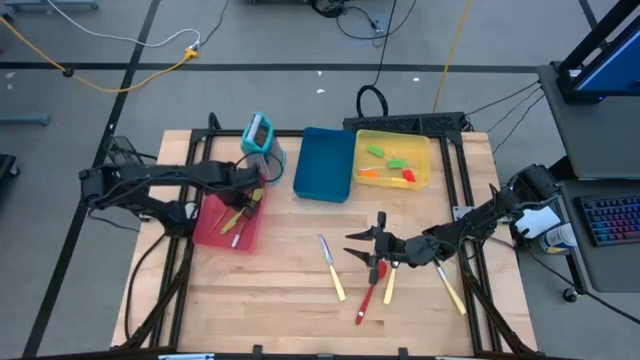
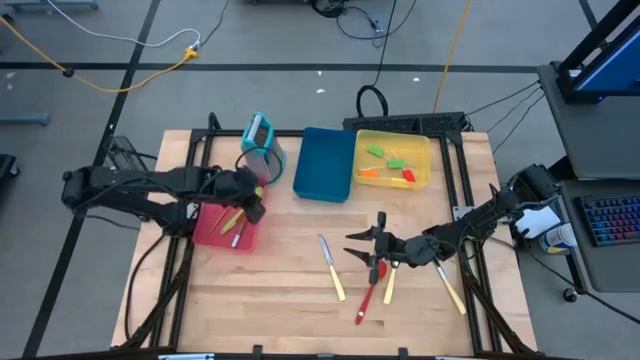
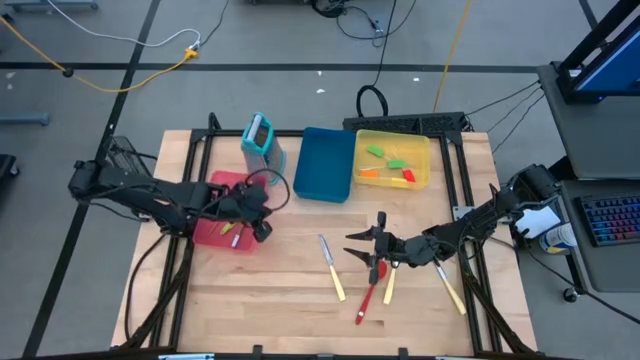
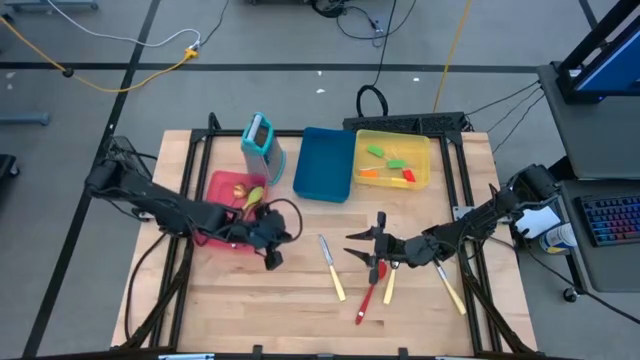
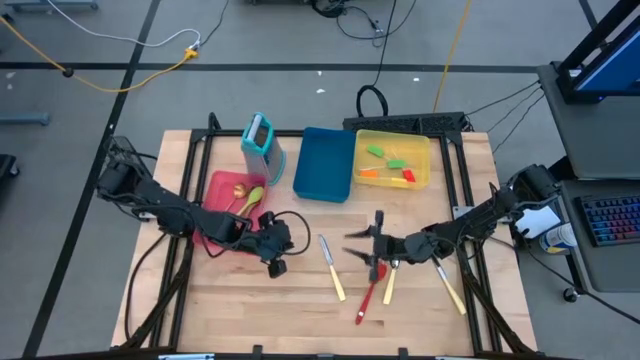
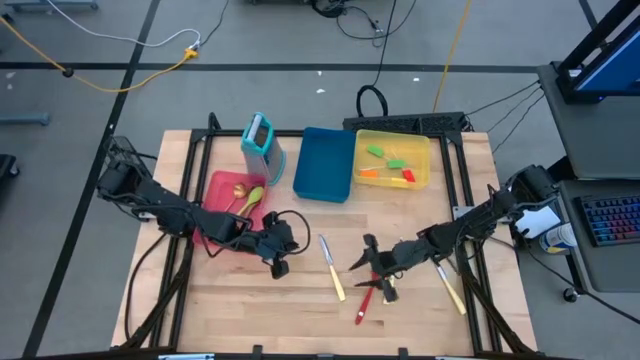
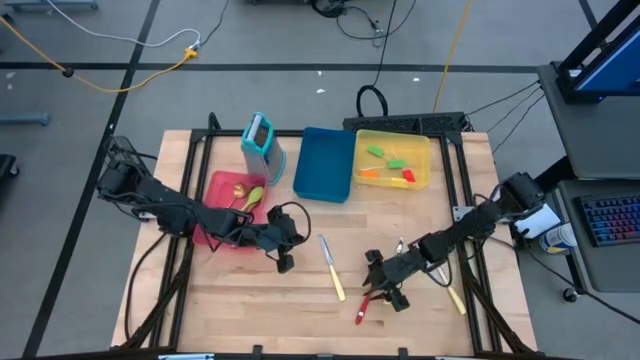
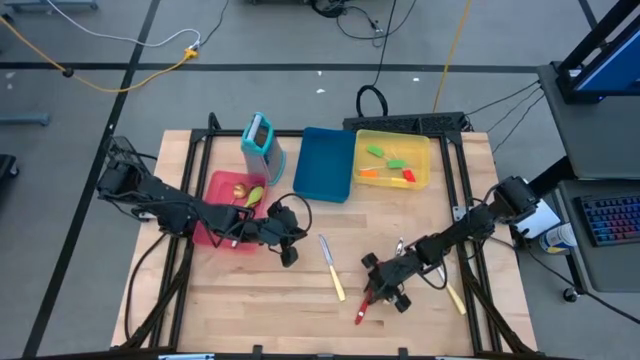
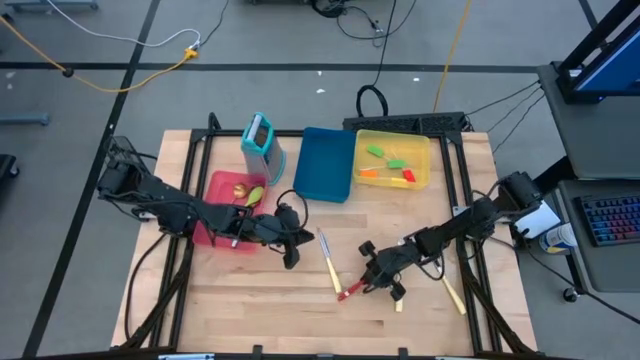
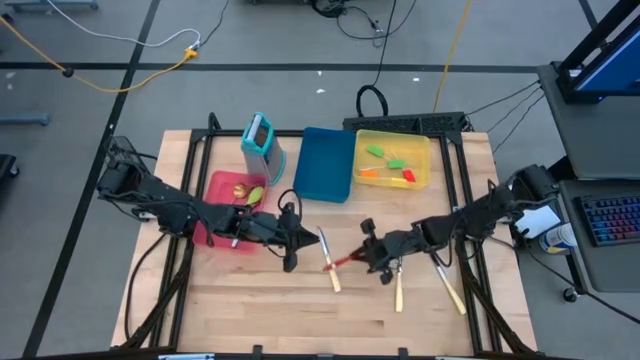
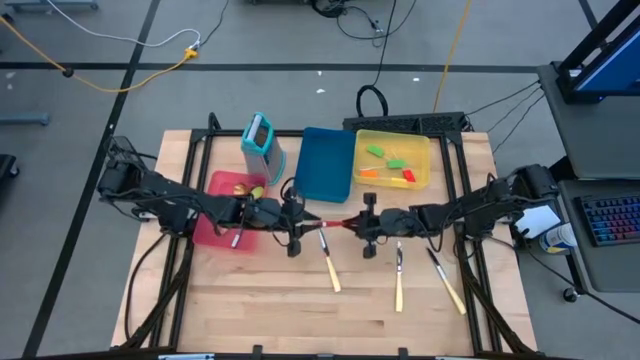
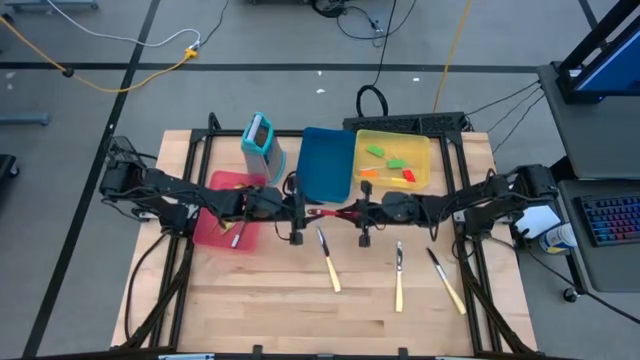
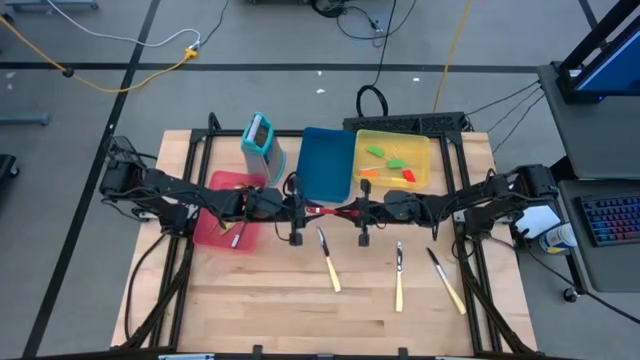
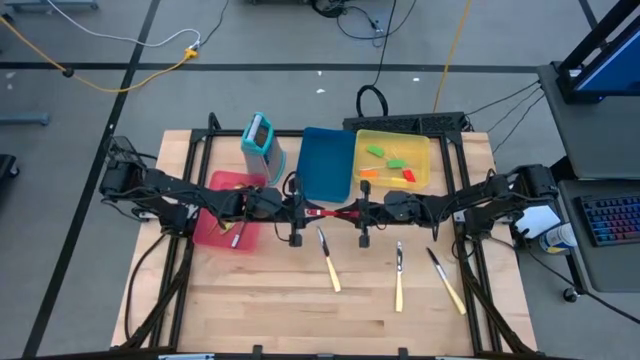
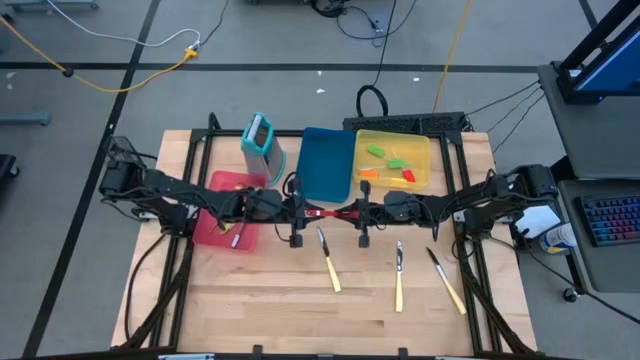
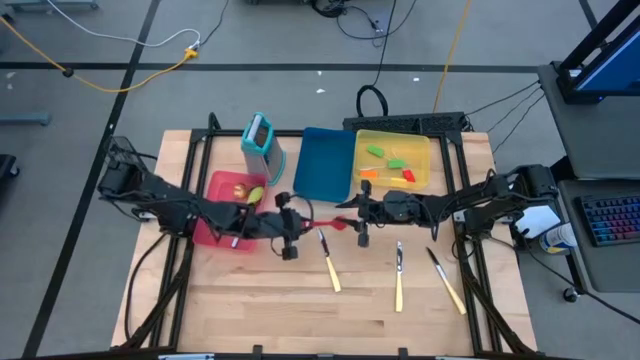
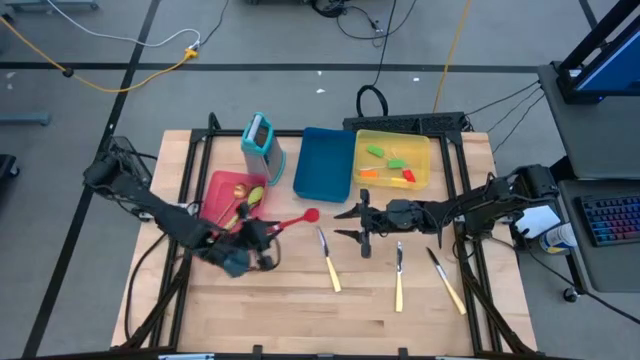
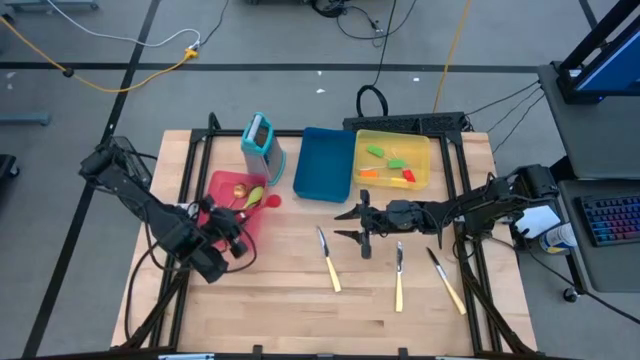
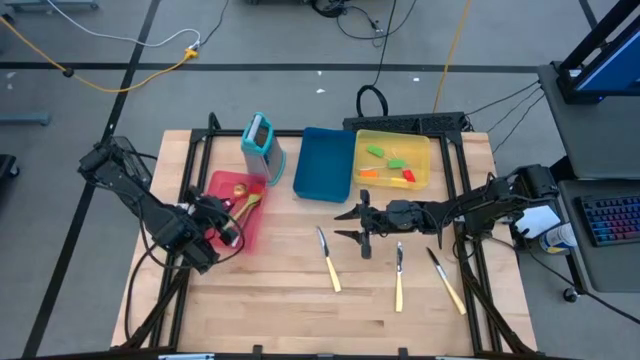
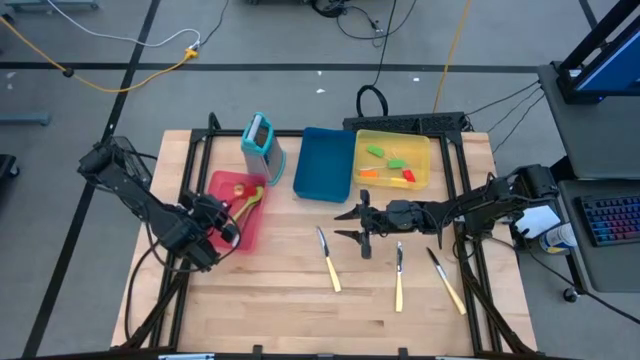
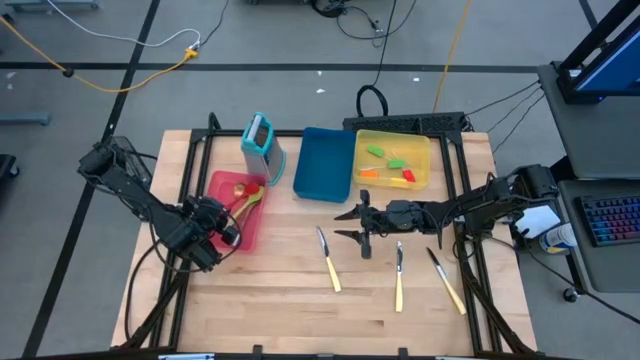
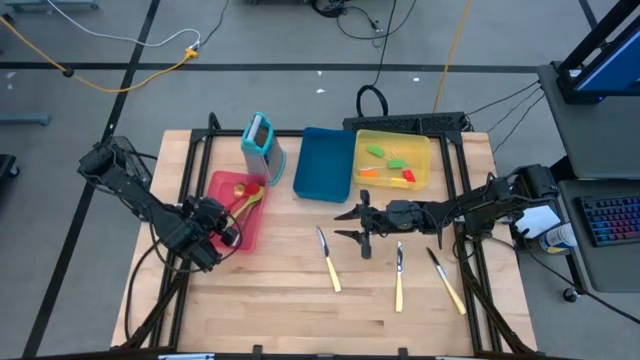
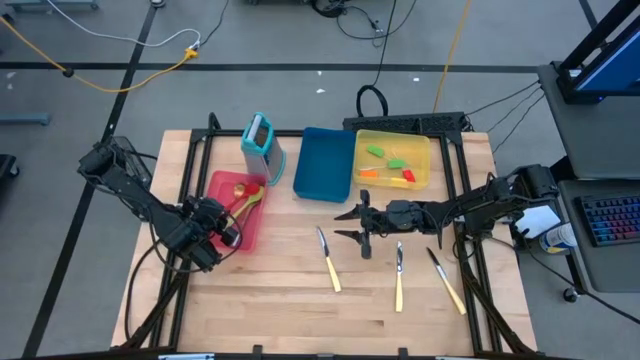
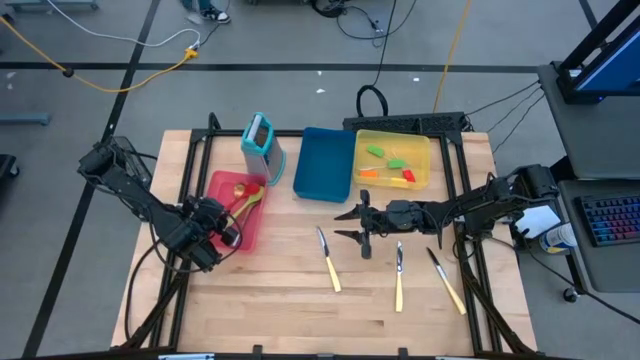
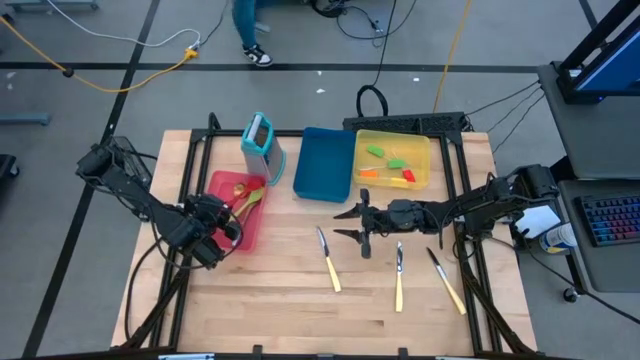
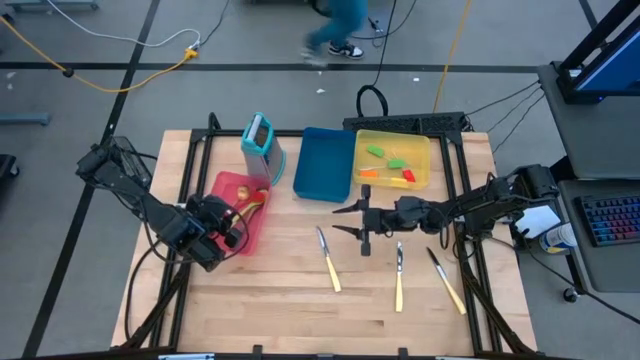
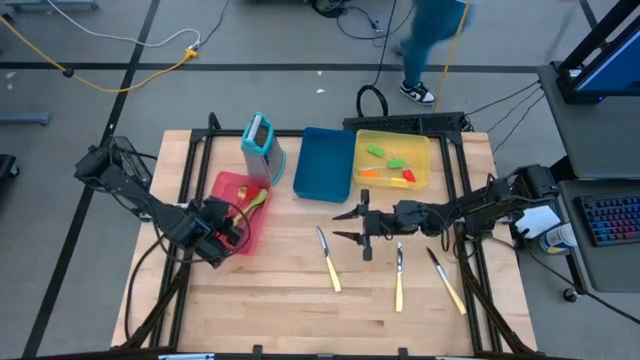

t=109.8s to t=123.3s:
Task: Pick & Place Kitchen Items
Put the red serving spoon into the pink bin

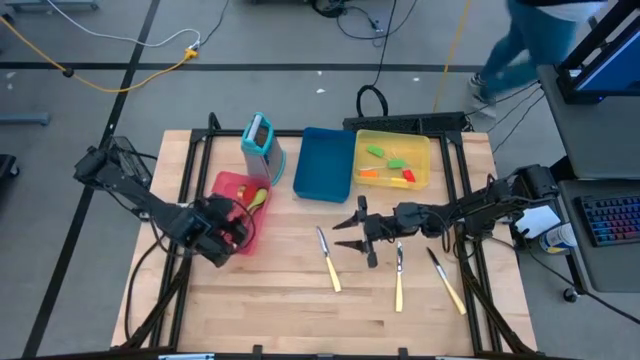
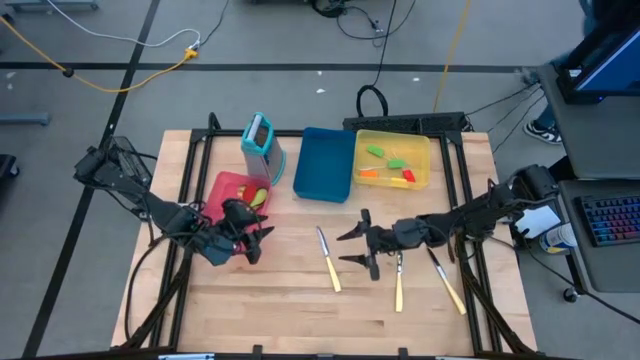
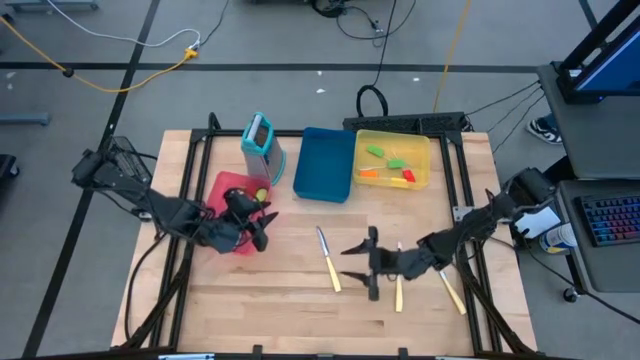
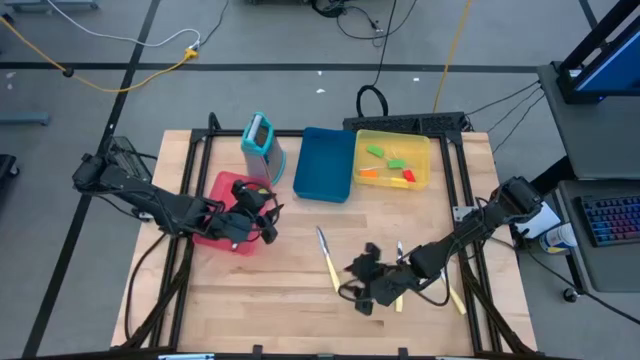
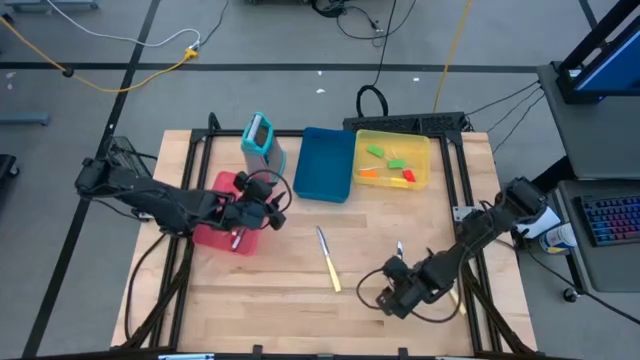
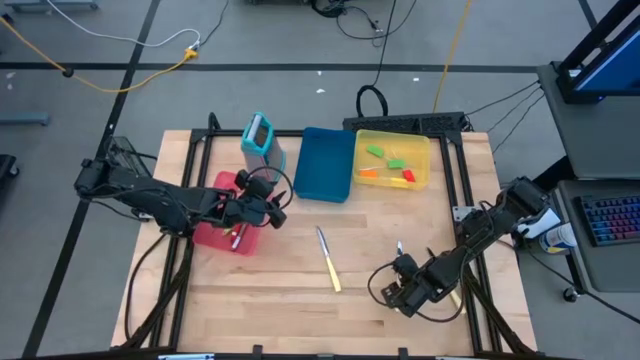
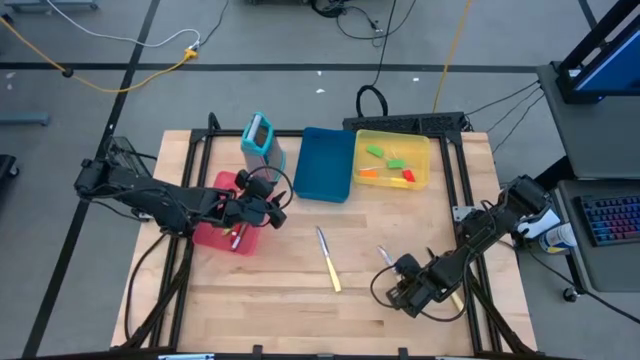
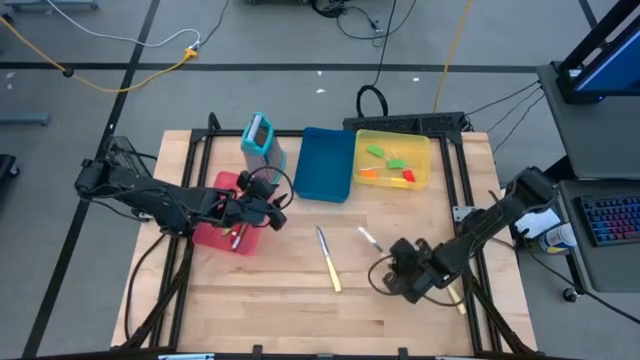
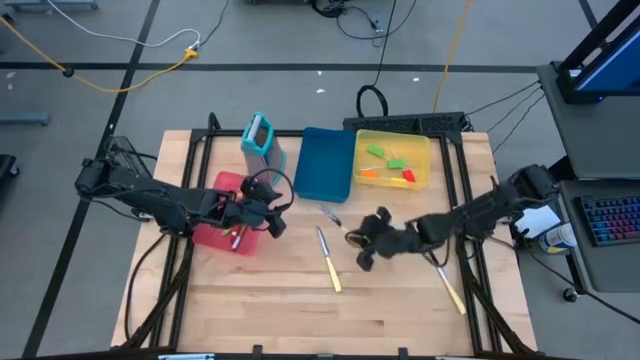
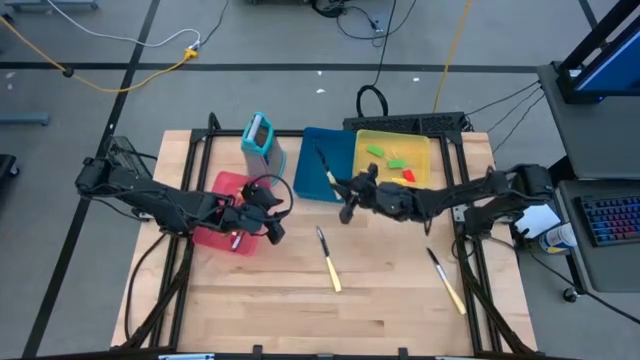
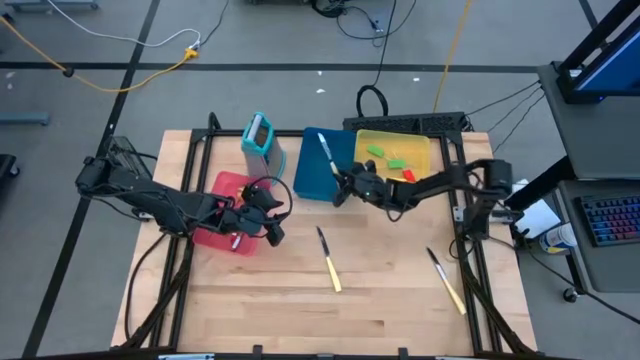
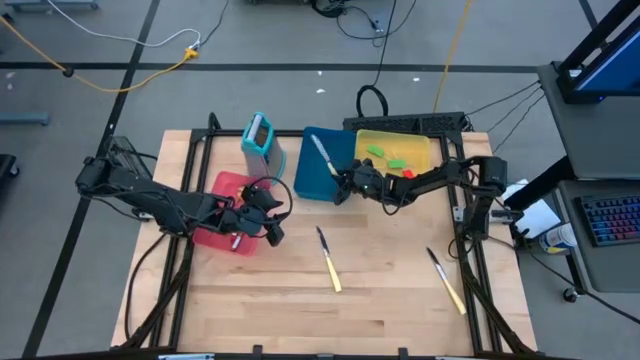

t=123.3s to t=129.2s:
Put the middle yellow table knife into the blue bin
